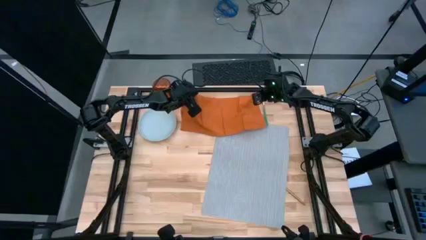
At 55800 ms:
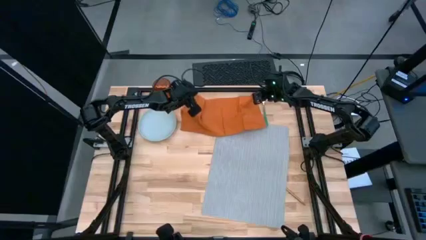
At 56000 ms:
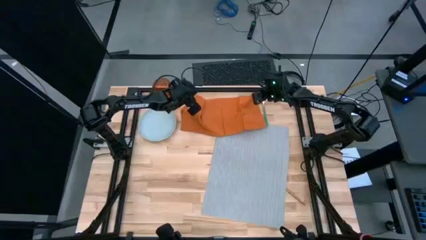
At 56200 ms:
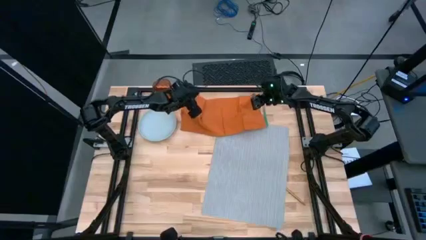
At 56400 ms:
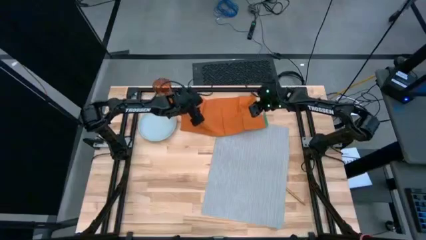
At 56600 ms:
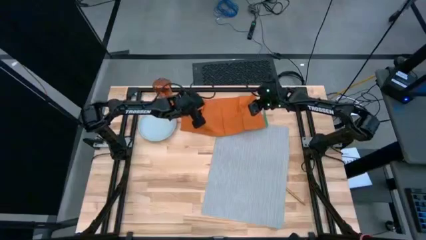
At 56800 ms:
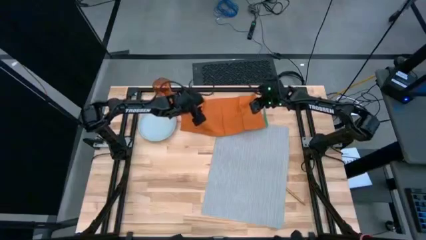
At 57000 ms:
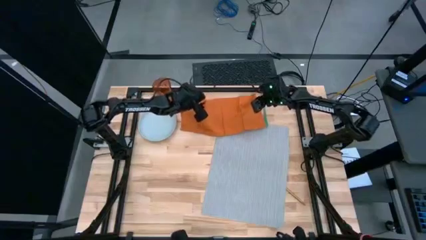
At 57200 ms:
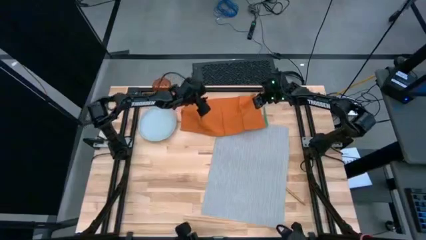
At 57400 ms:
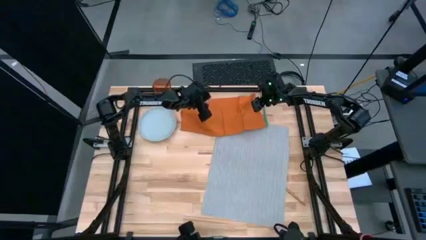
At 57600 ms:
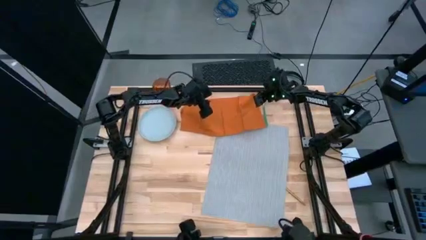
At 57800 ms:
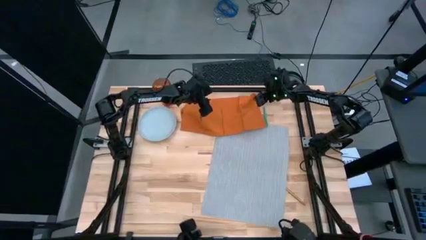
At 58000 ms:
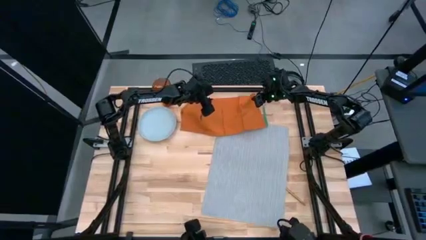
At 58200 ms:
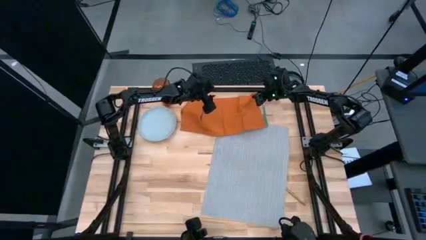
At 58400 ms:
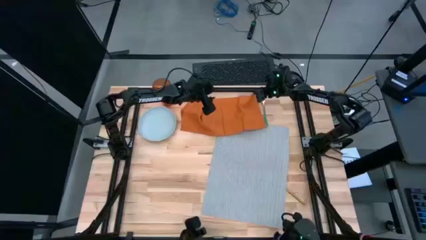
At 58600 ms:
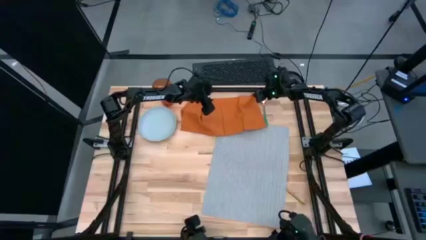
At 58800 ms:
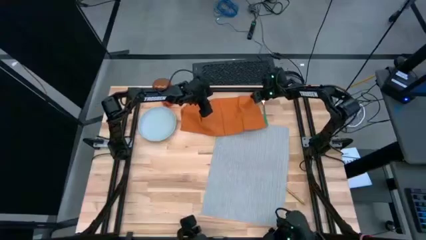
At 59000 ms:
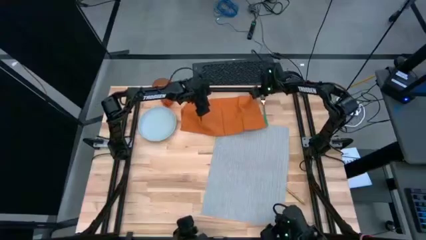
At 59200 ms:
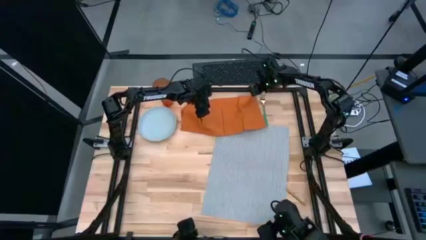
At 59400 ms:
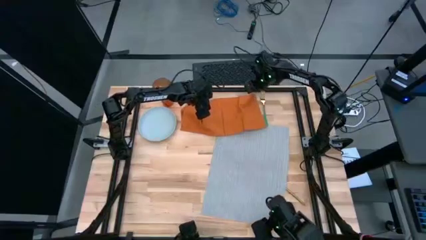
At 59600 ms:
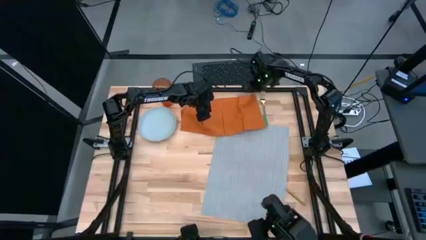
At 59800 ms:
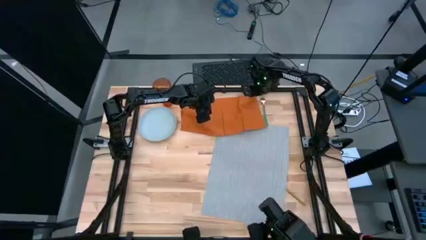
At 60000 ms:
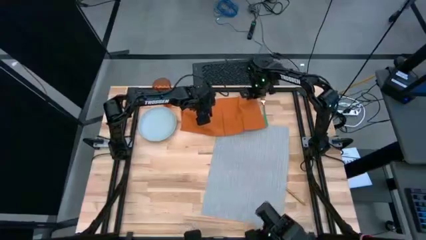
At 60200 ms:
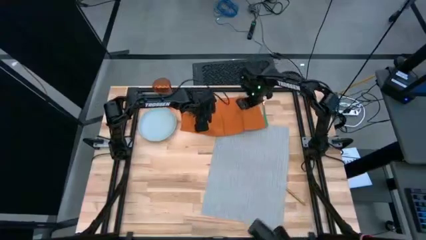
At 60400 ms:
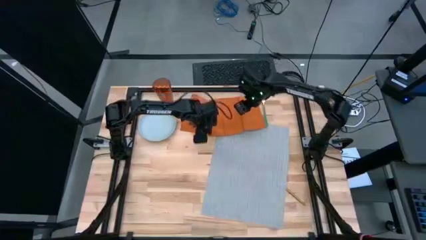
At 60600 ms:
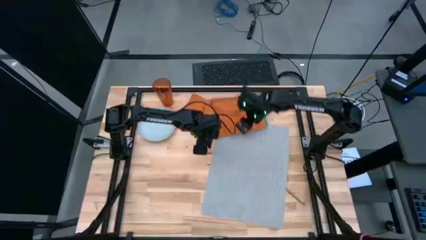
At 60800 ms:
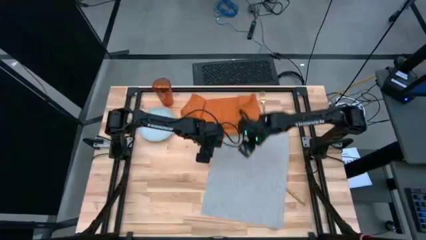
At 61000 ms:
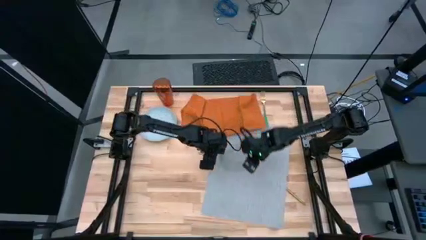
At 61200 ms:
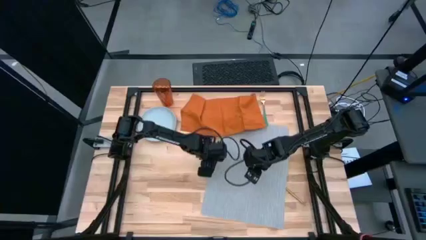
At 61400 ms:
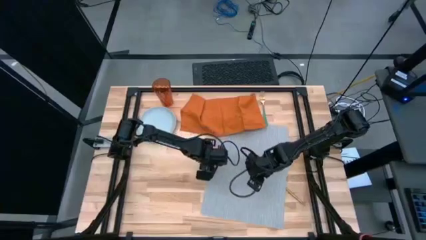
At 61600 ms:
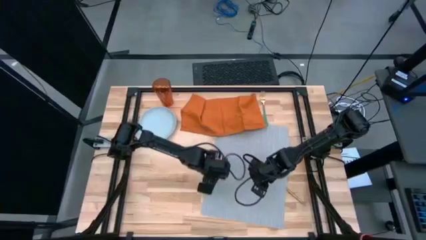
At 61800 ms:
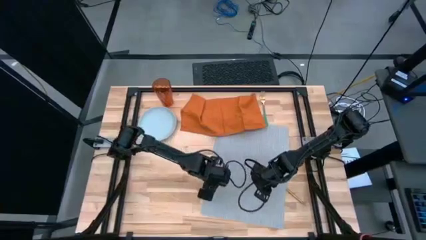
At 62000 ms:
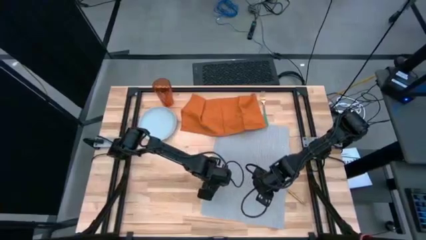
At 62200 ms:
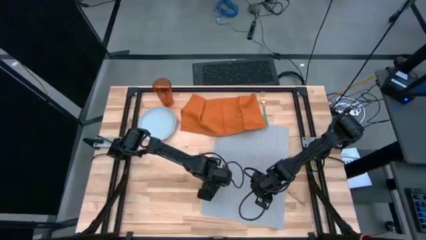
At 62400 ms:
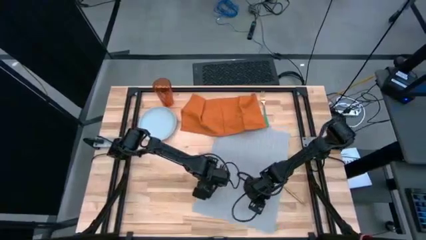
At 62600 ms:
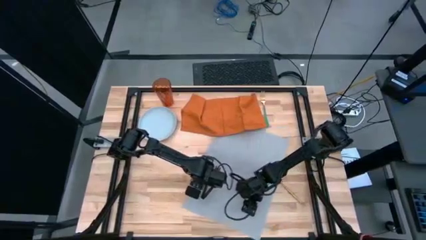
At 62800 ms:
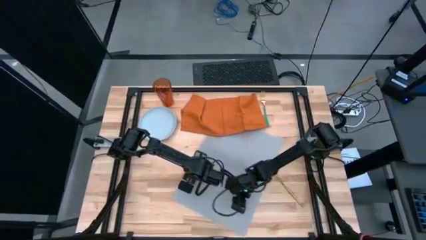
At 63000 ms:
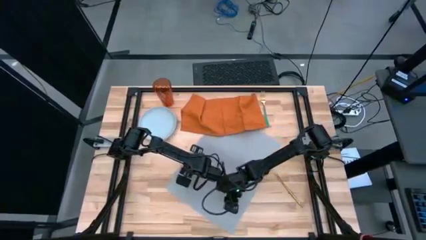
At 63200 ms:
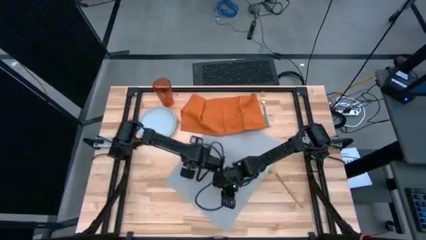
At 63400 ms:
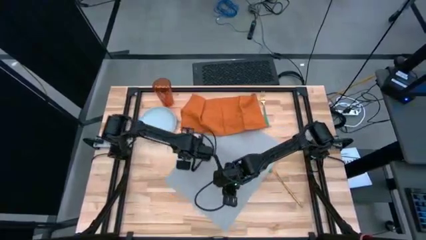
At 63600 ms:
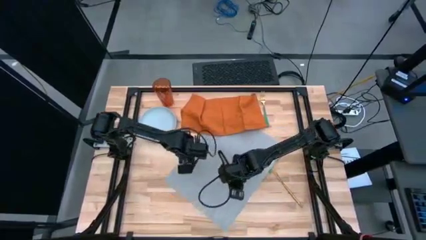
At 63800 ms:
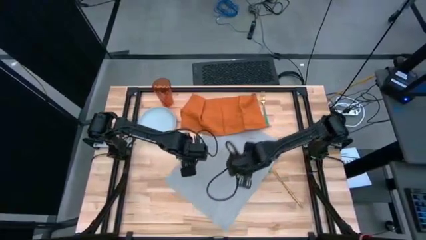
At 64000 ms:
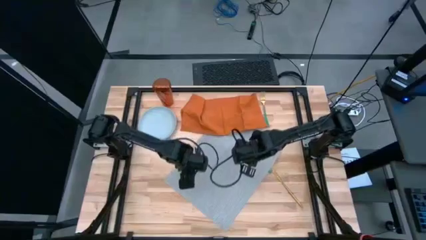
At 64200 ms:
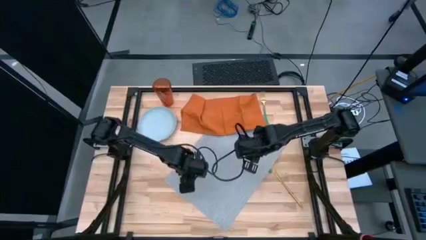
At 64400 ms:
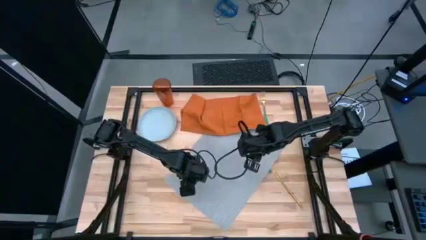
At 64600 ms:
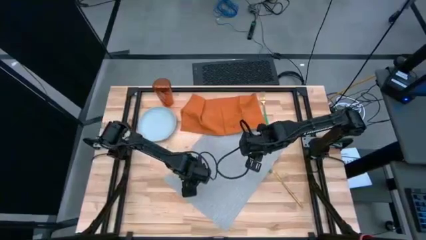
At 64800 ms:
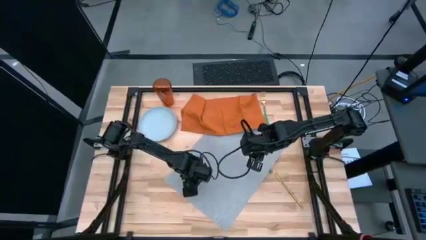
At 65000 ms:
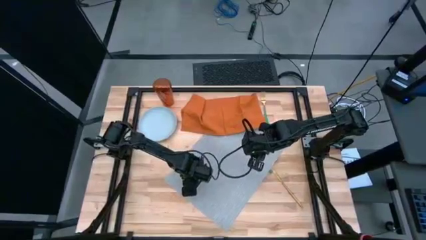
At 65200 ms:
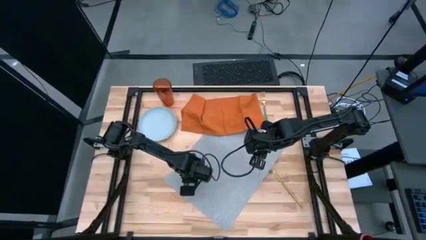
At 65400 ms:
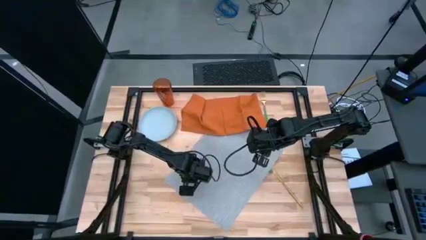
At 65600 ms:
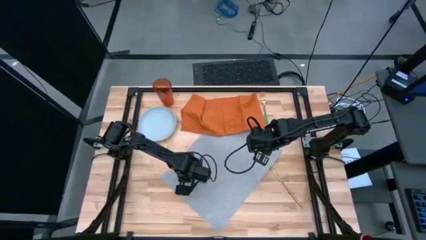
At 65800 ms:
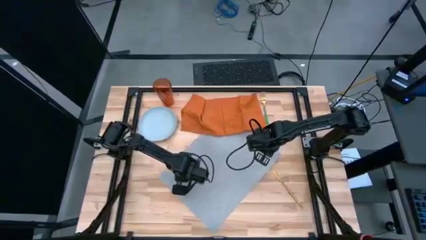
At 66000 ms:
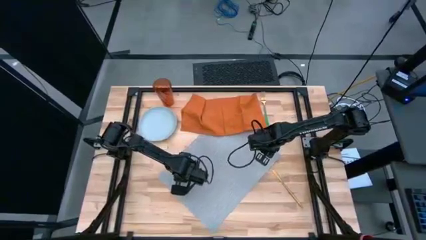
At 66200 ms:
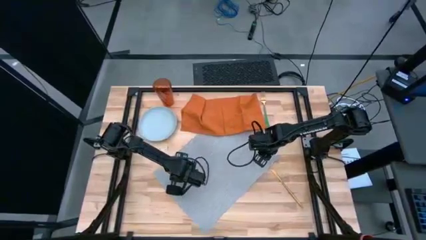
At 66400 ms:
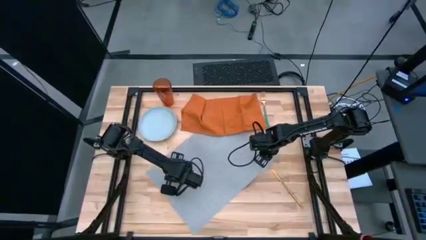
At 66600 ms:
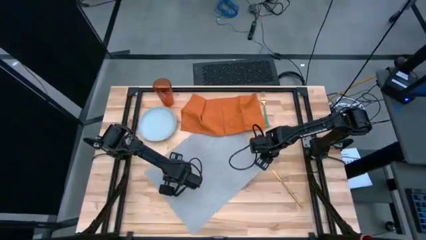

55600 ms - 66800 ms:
Task: Set table place
Move the grey placemat

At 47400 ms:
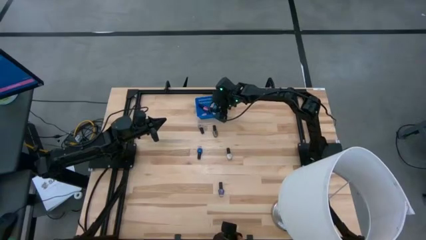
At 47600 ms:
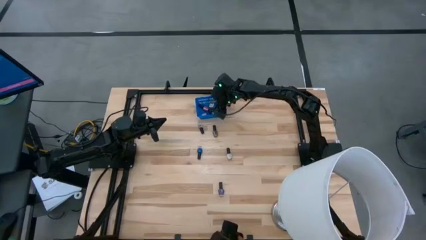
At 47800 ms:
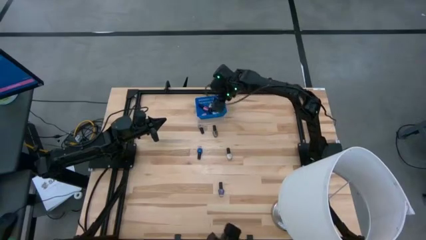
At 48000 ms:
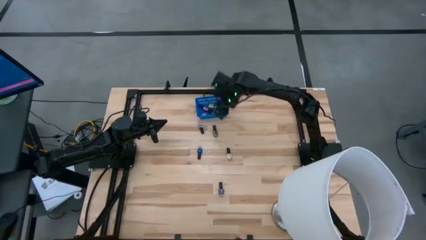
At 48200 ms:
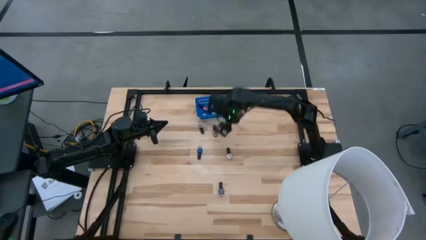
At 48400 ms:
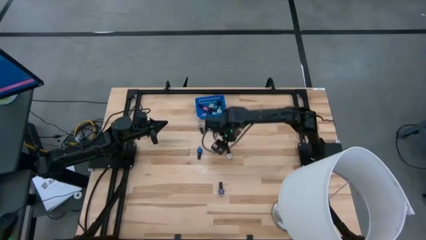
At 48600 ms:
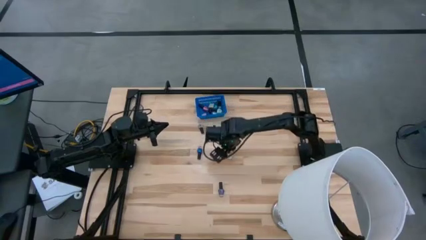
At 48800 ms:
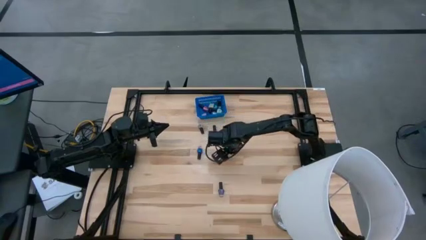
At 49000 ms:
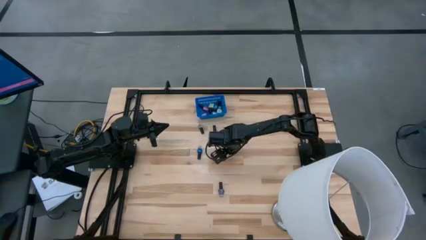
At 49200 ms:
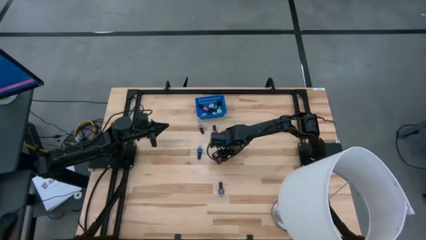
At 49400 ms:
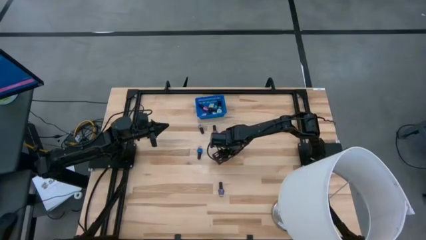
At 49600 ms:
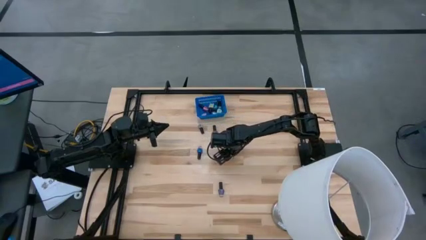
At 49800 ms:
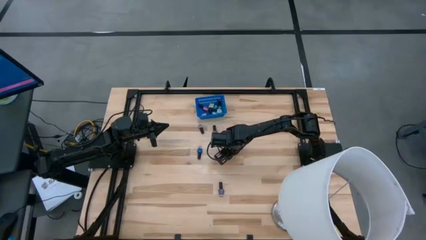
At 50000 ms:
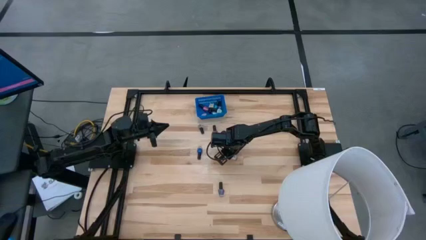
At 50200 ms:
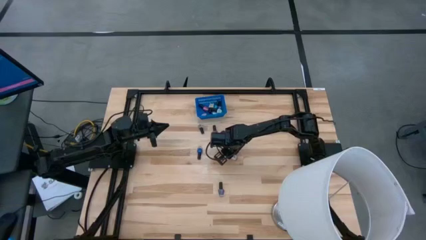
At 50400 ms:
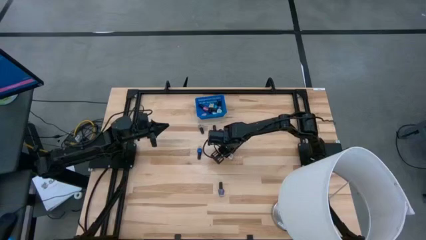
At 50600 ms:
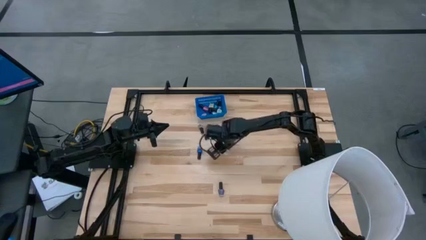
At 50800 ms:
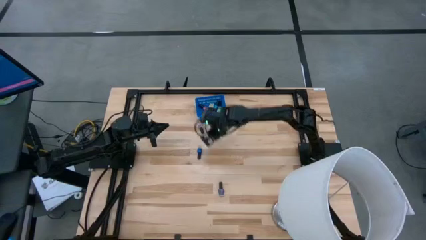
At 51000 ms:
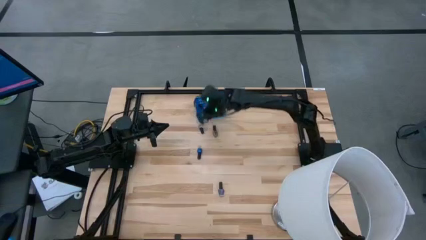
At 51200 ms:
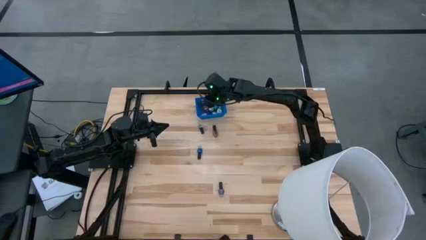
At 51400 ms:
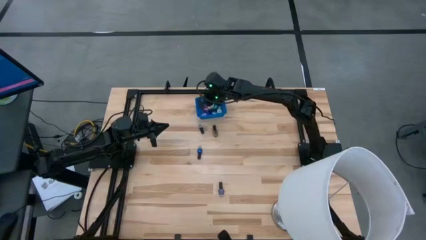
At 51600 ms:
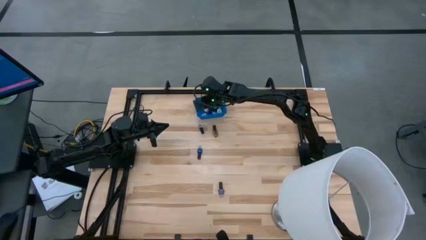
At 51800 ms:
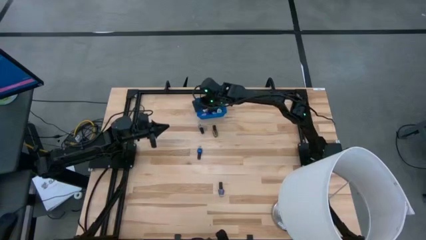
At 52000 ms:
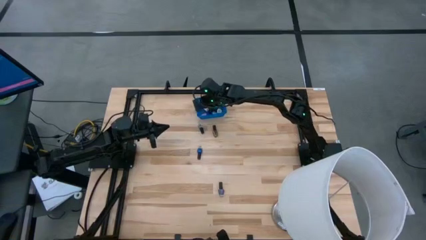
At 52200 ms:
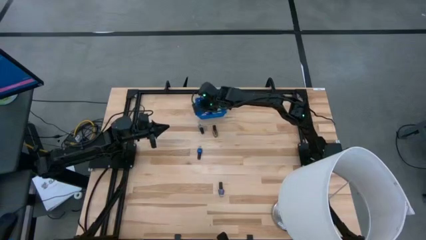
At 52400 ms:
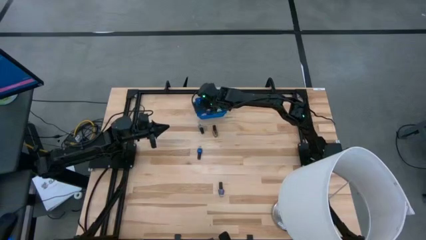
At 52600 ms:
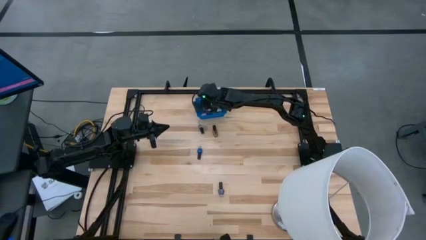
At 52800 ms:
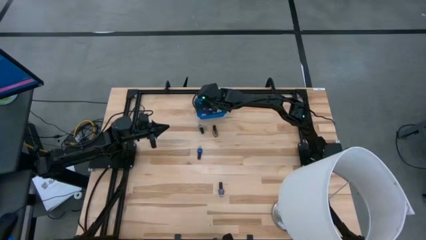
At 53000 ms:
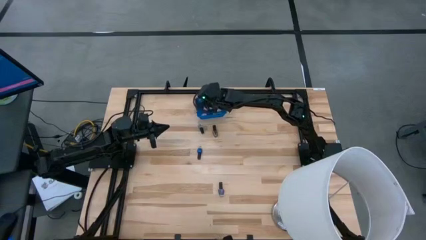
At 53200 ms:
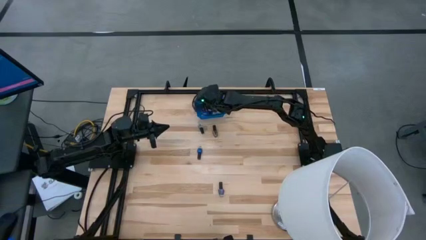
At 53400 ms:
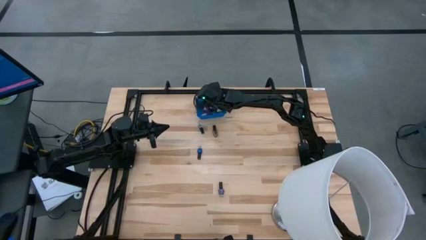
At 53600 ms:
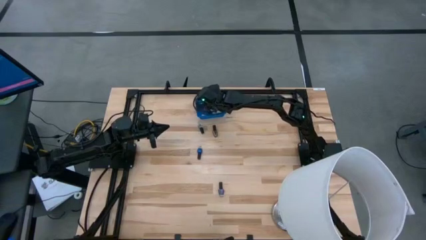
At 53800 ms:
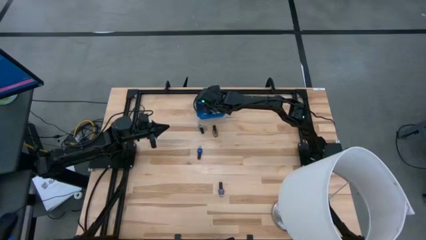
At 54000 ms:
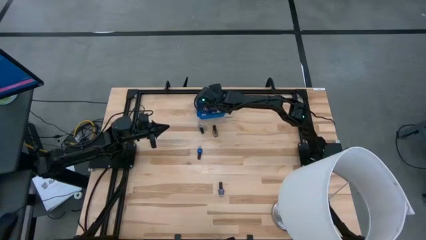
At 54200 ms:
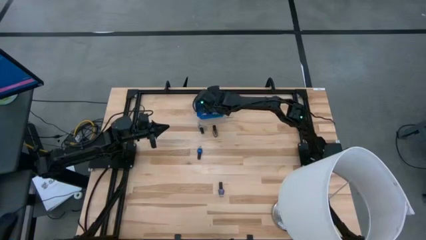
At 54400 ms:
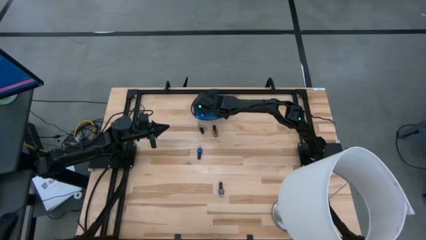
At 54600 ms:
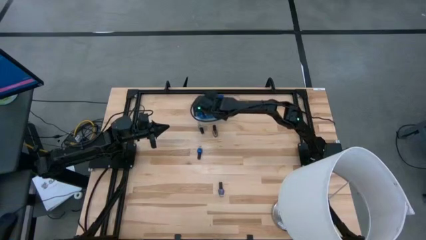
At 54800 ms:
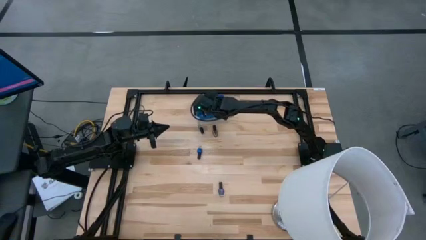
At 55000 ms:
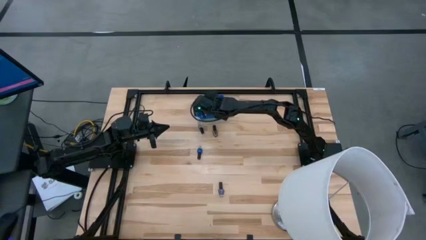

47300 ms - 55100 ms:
Task: Pick & Place Nail Polish
Put the white nail polish bottle into the blue basket
